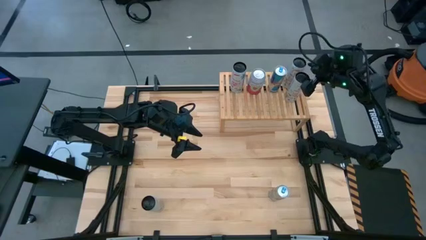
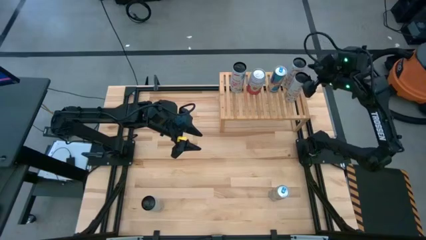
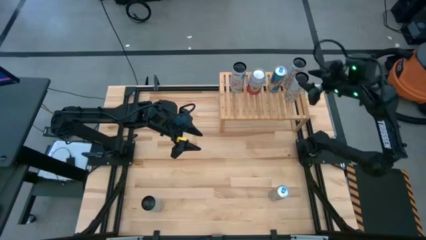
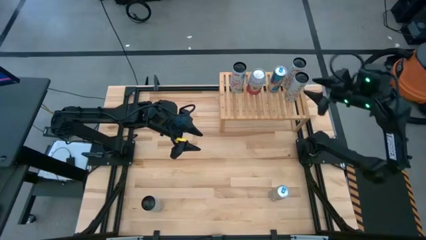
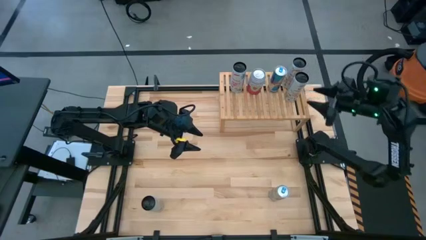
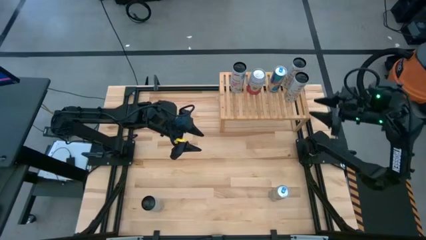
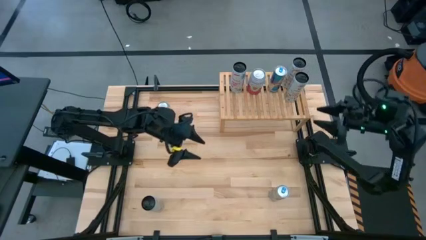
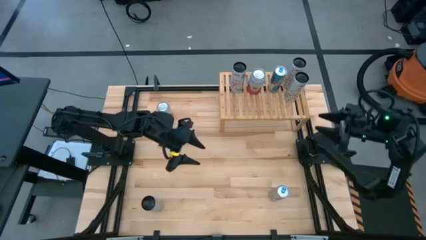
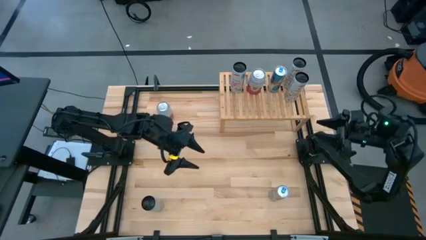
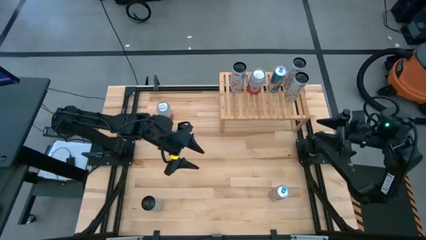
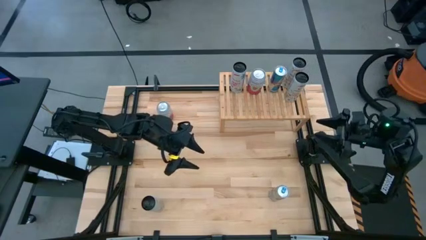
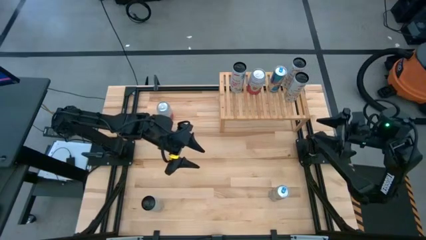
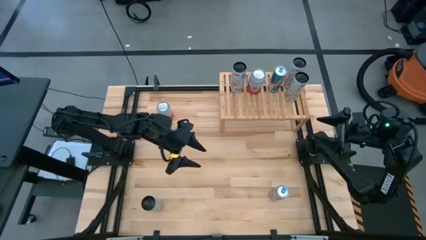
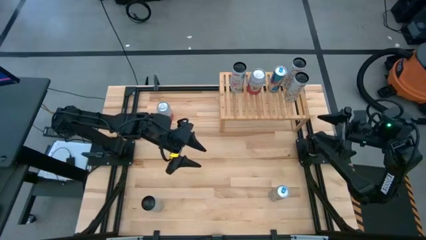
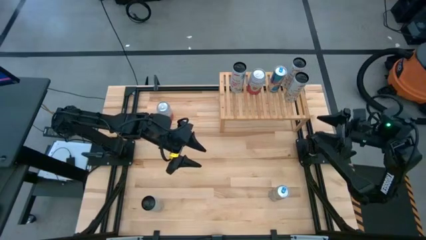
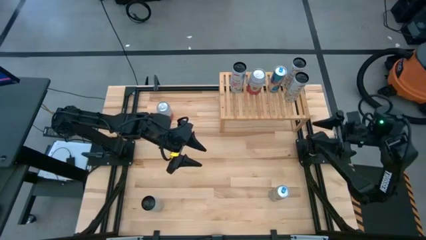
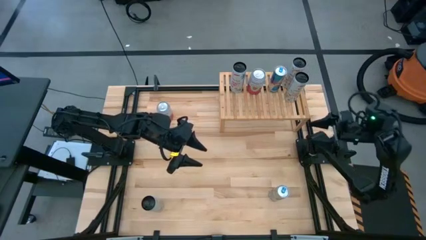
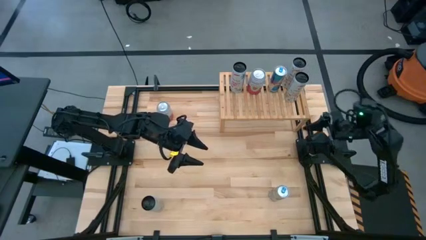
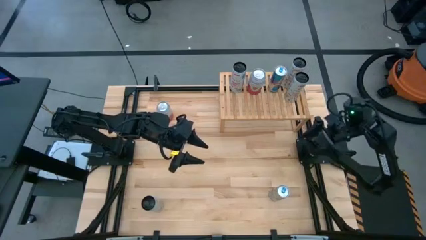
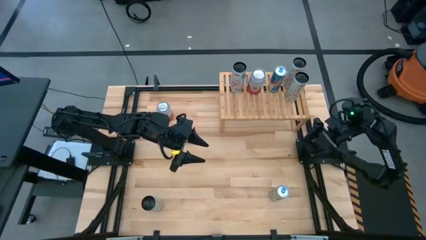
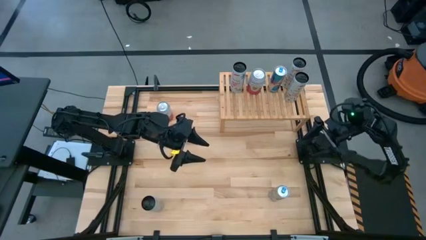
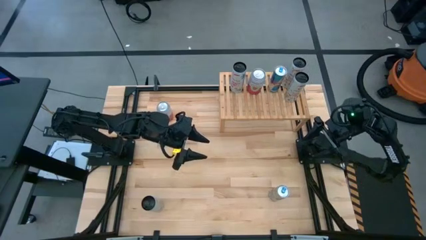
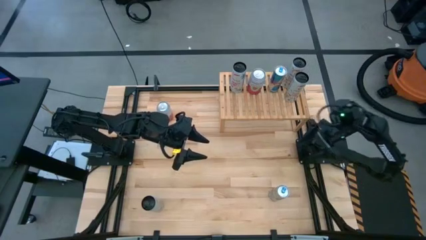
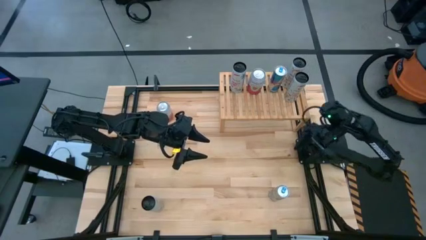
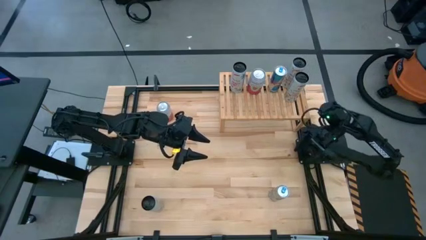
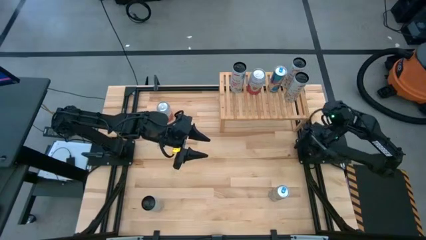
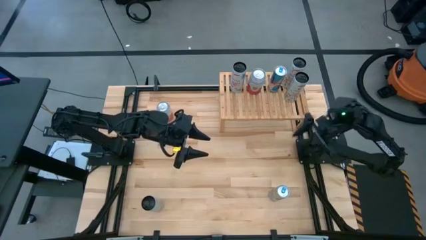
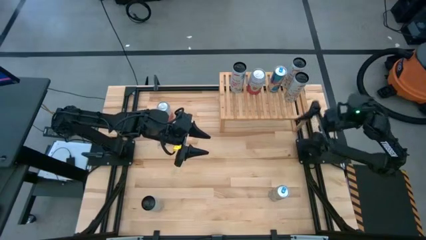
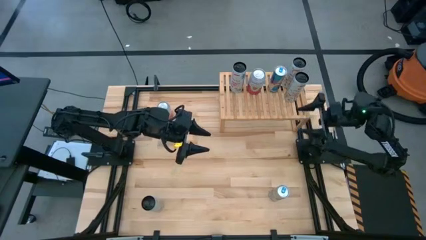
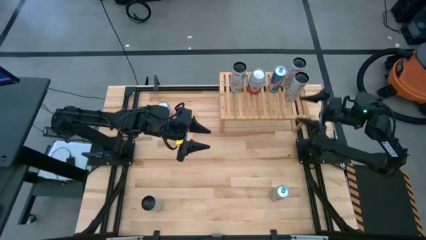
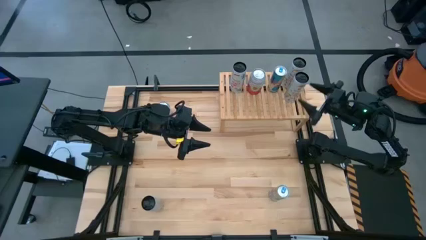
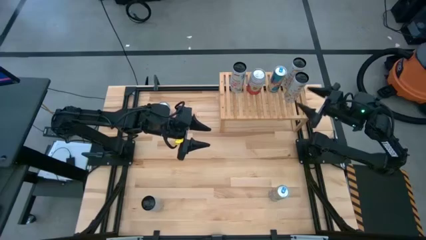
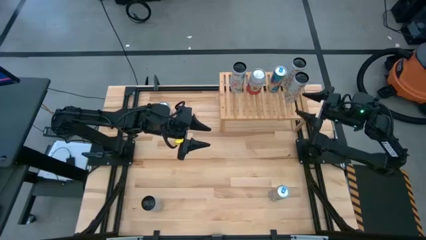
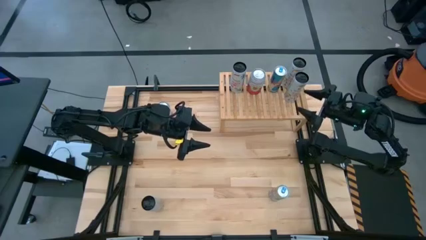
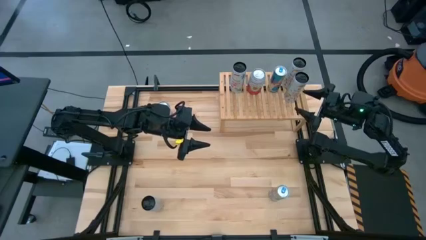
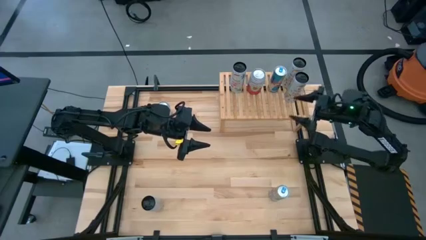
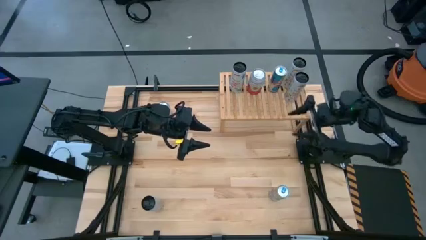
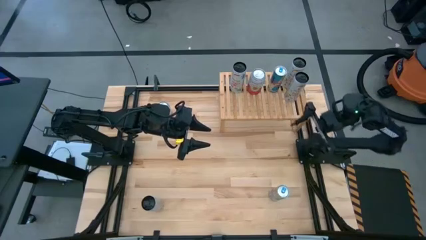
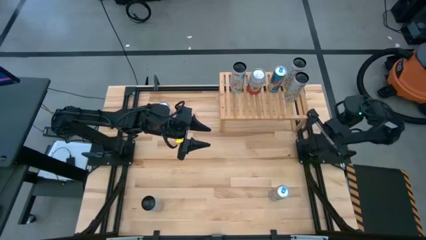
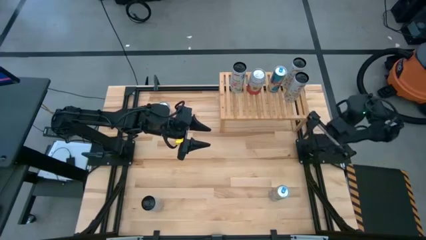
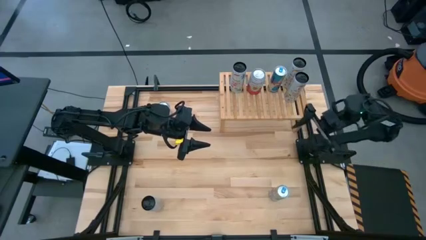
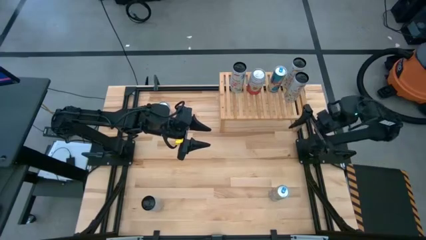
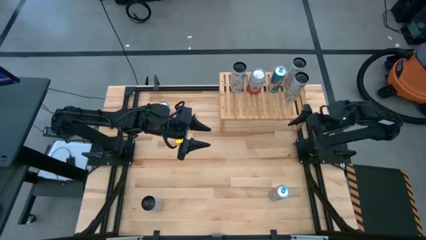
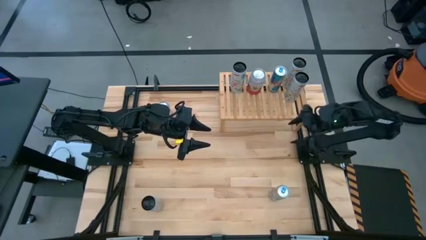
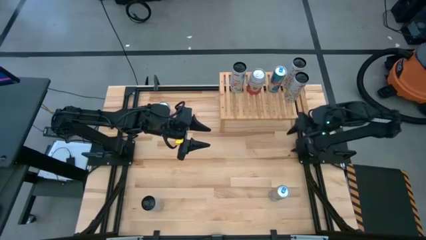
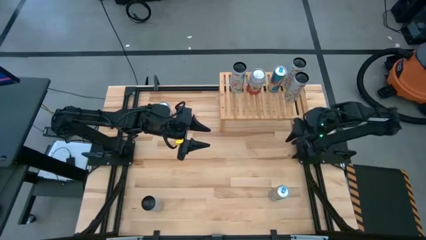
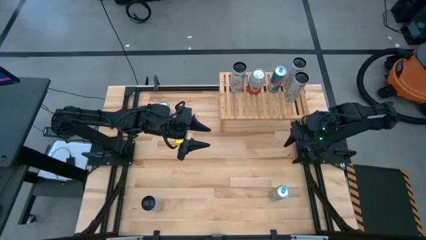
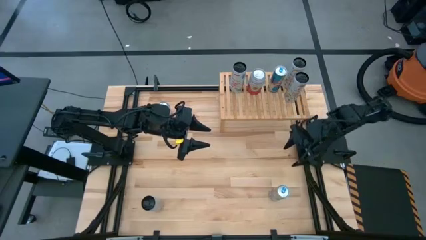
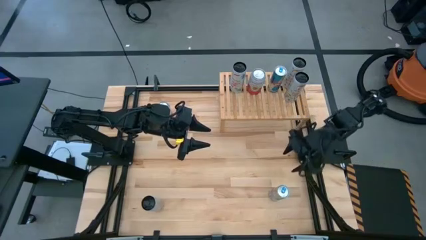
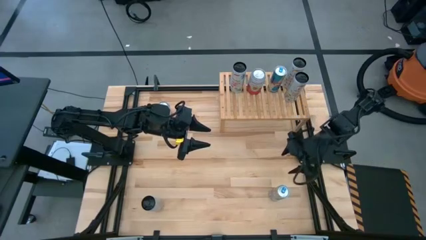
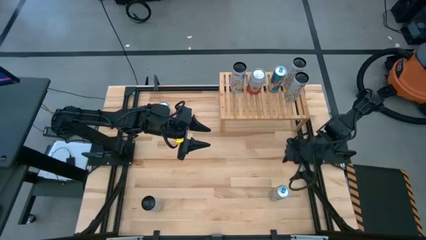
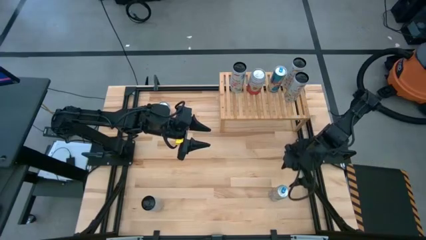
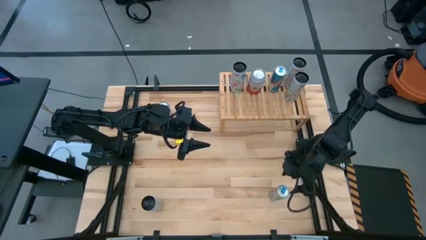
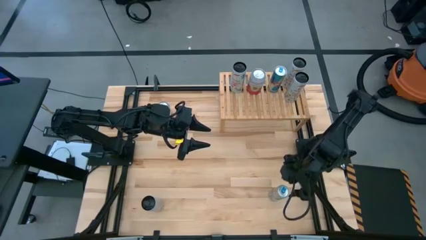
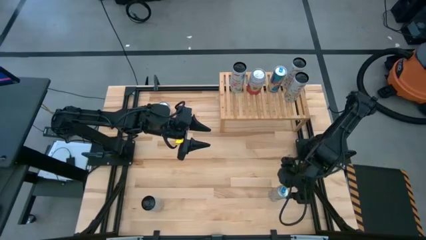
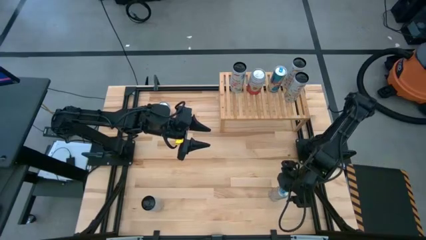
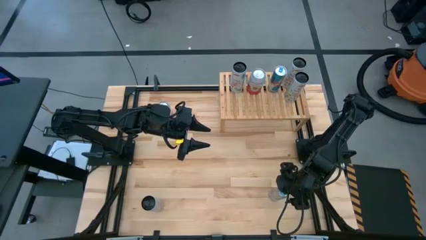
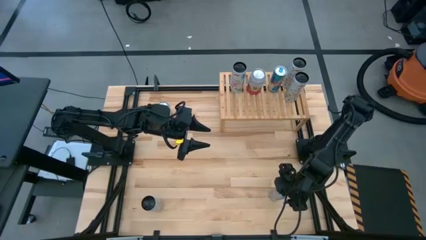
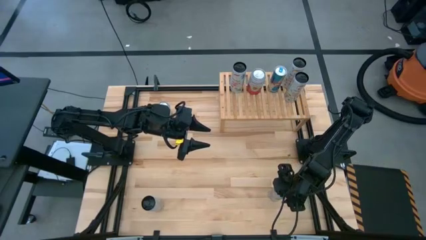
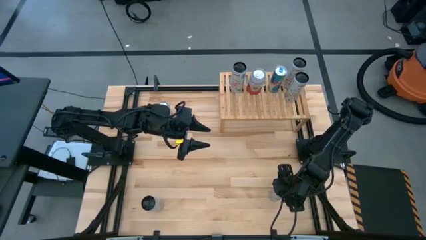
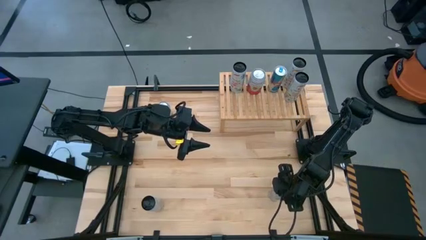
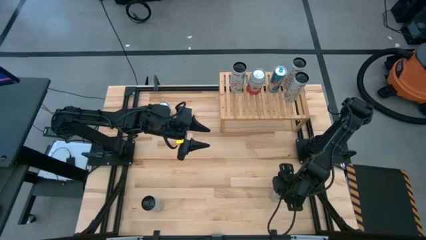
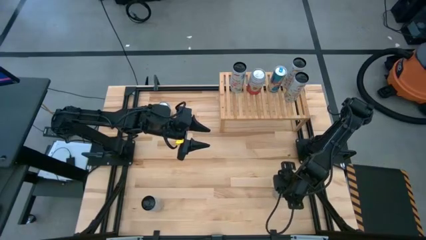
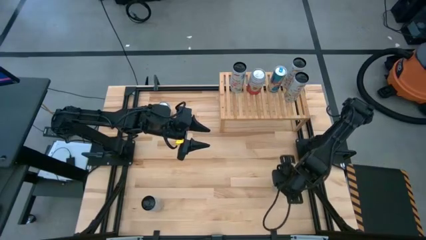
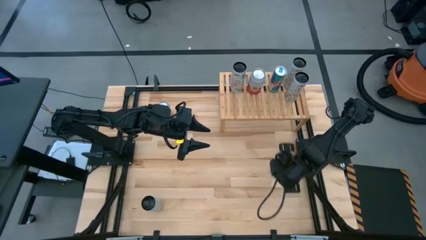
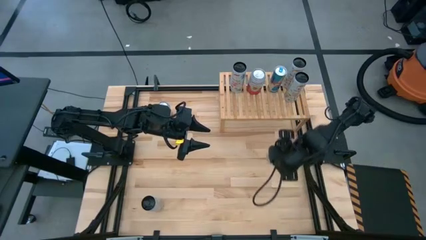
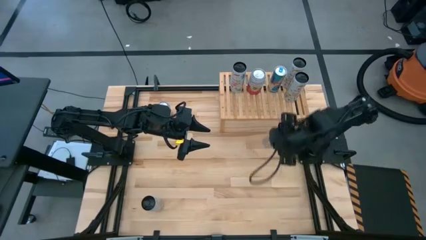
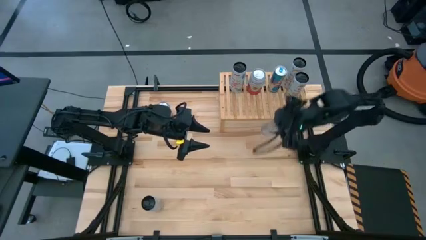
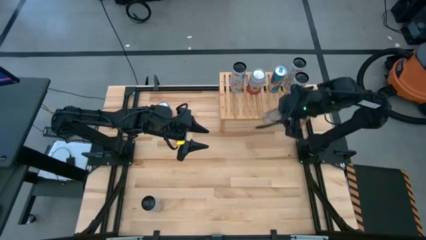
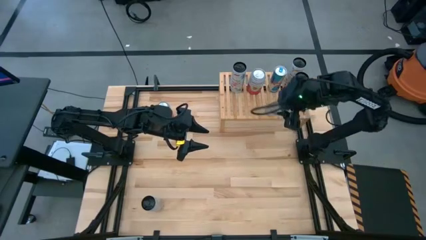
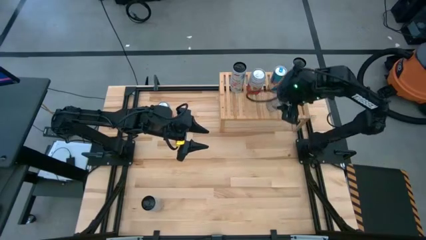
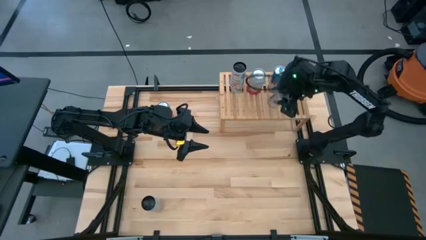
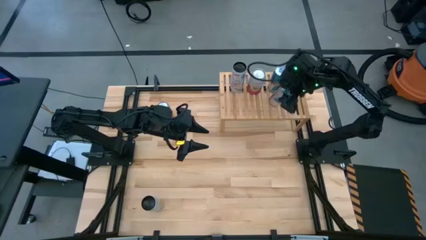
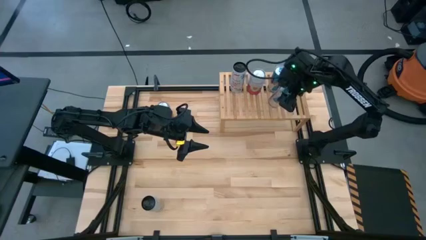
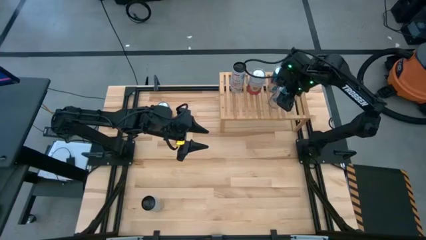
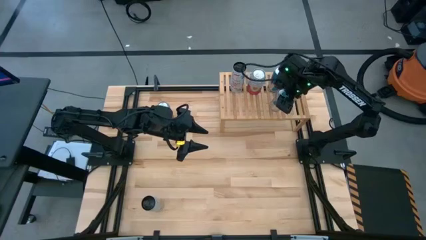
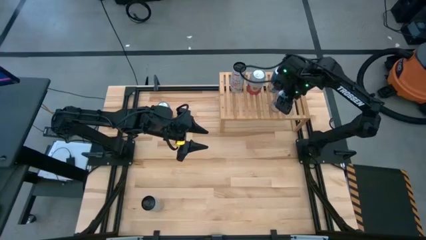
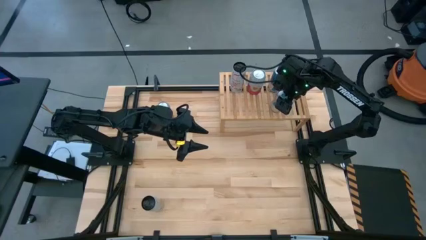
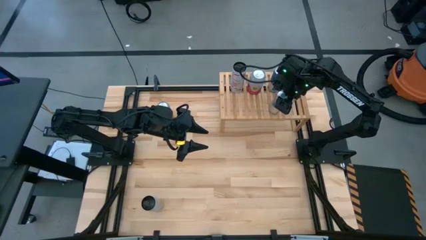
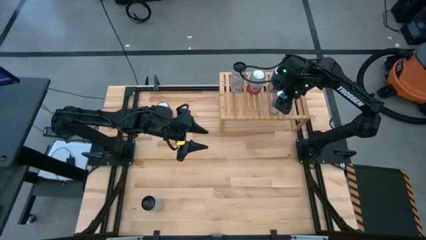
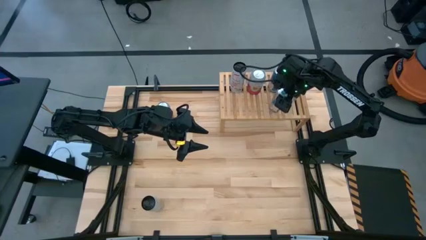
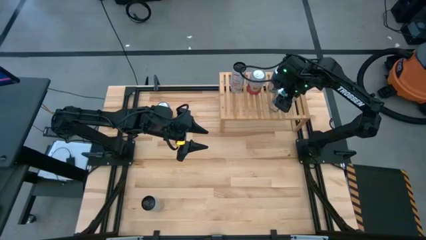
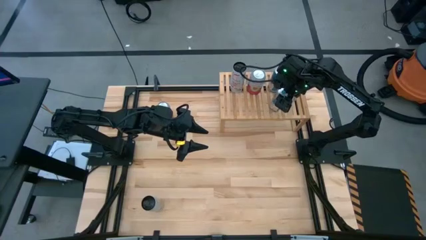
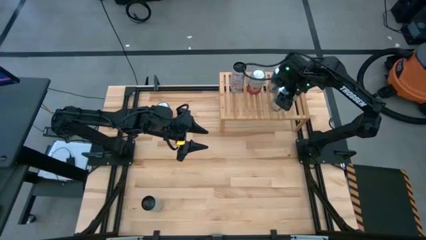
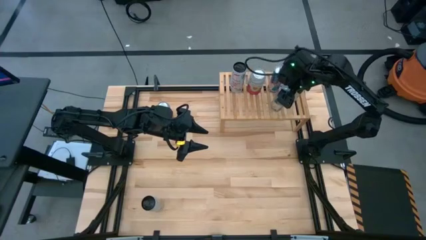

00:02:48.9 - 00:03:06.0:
Task: Place canned beverage on shelf
Put the blue soda can on the shelf aligned with the other blue soda can
